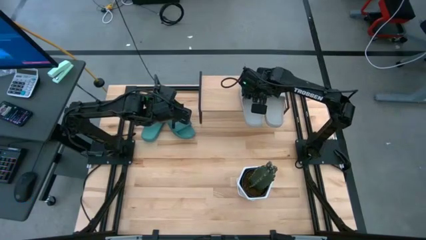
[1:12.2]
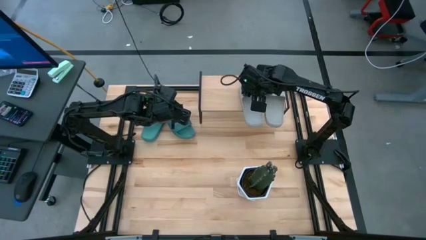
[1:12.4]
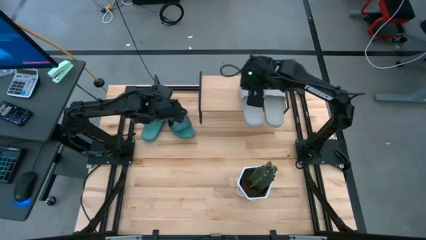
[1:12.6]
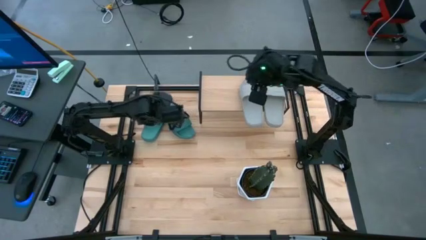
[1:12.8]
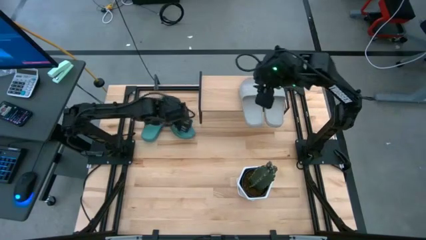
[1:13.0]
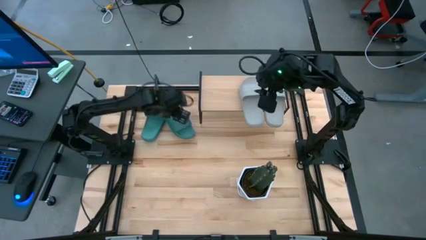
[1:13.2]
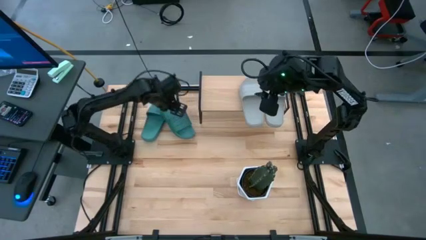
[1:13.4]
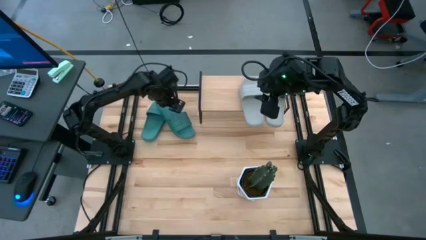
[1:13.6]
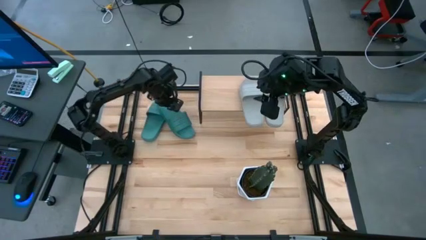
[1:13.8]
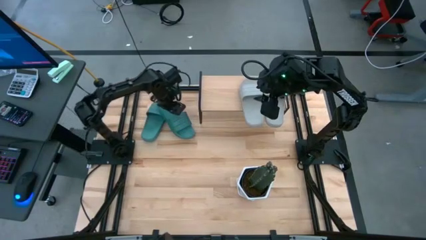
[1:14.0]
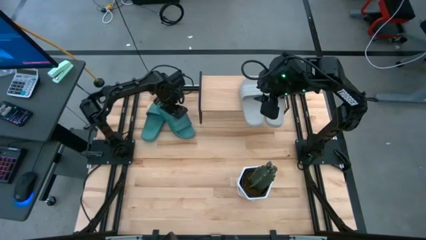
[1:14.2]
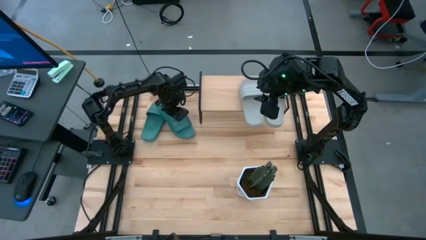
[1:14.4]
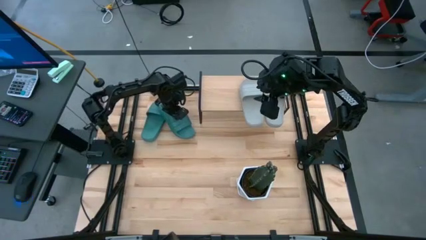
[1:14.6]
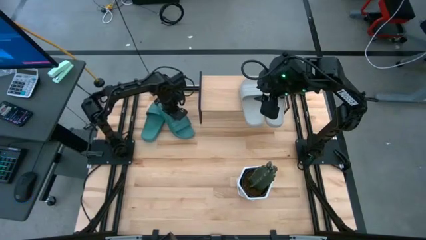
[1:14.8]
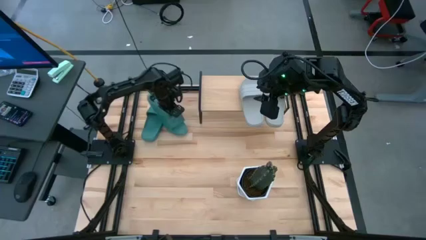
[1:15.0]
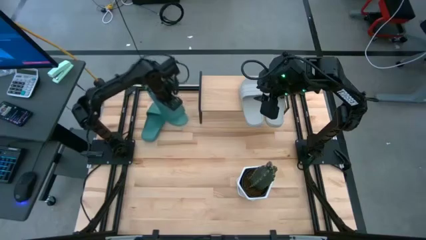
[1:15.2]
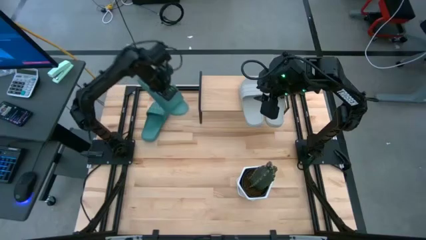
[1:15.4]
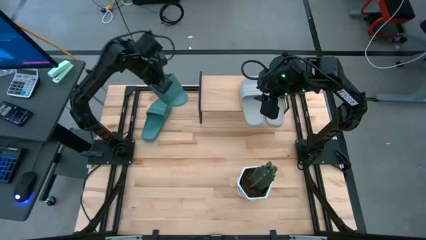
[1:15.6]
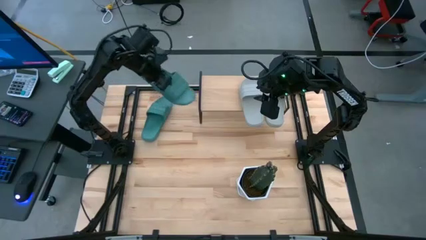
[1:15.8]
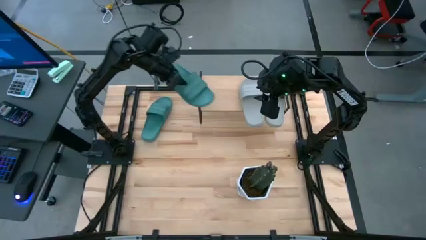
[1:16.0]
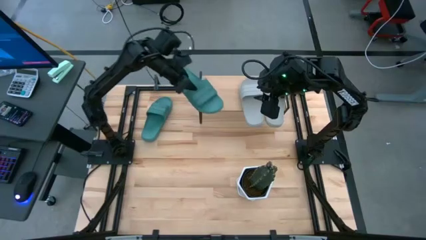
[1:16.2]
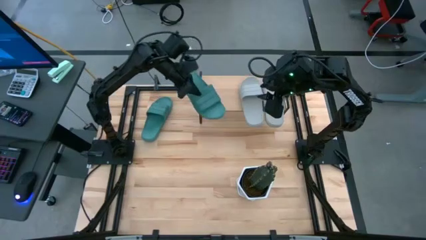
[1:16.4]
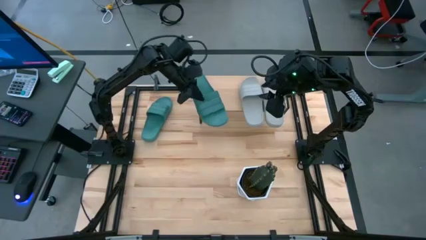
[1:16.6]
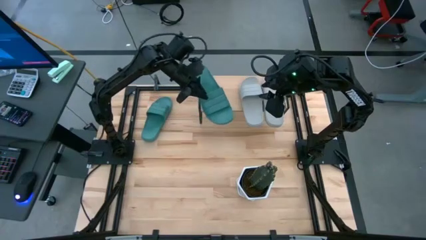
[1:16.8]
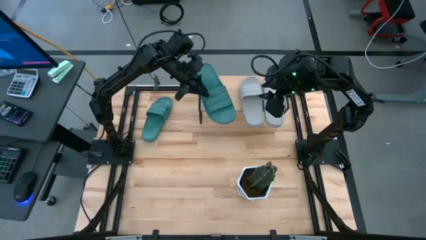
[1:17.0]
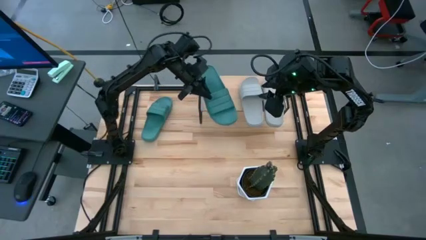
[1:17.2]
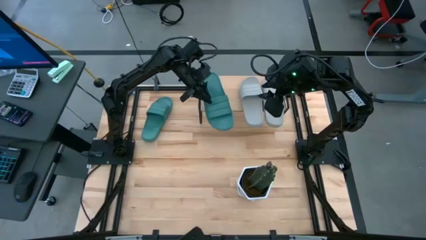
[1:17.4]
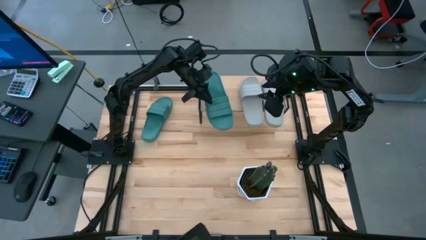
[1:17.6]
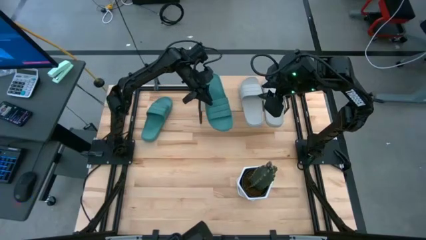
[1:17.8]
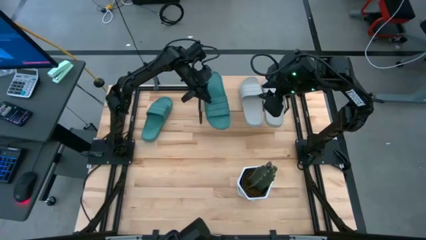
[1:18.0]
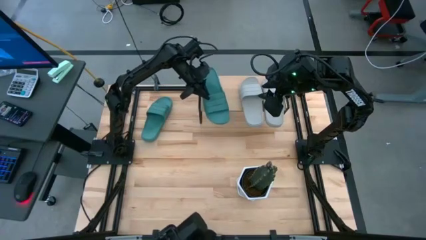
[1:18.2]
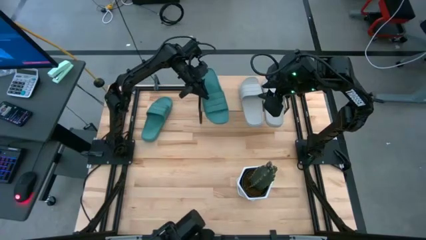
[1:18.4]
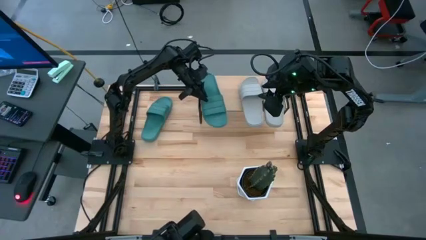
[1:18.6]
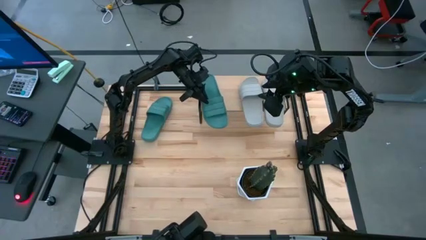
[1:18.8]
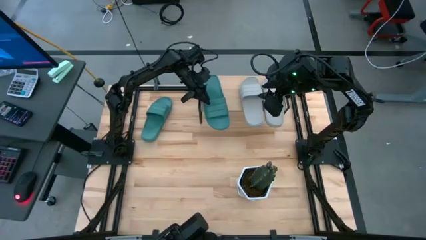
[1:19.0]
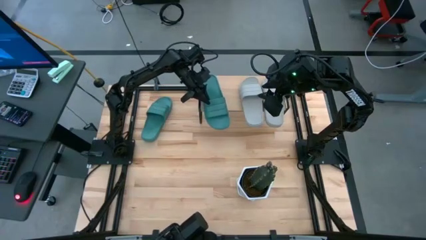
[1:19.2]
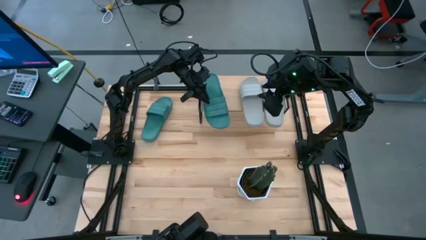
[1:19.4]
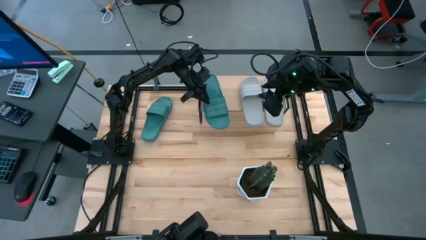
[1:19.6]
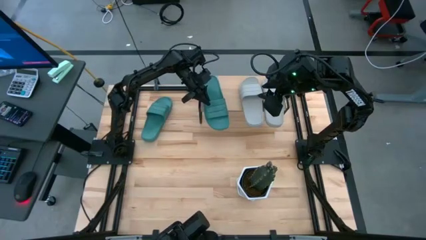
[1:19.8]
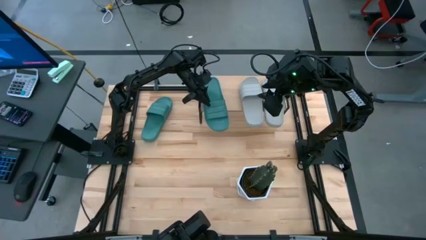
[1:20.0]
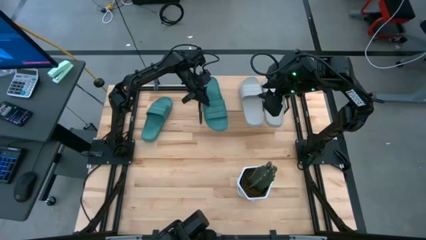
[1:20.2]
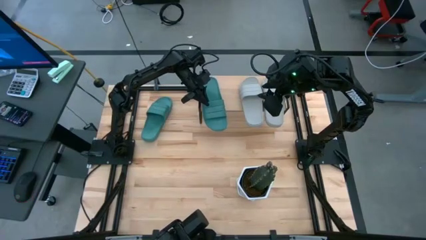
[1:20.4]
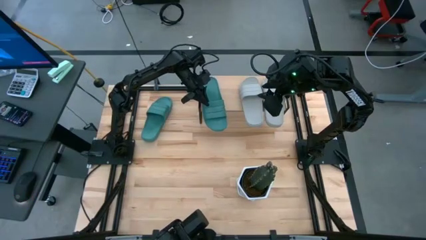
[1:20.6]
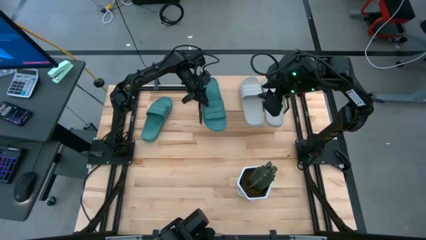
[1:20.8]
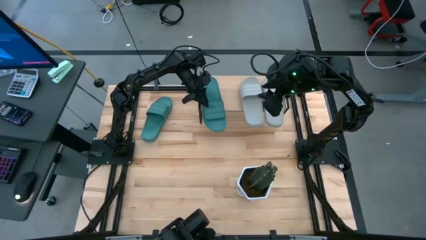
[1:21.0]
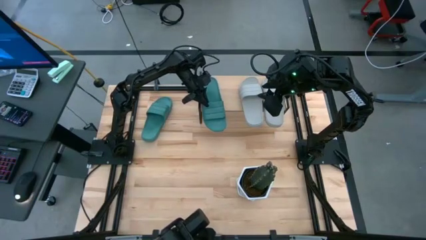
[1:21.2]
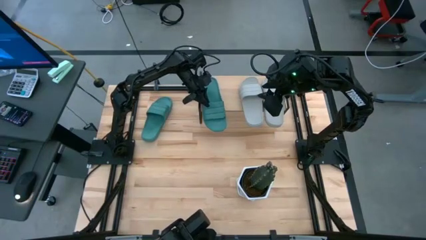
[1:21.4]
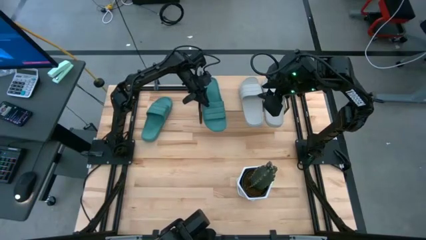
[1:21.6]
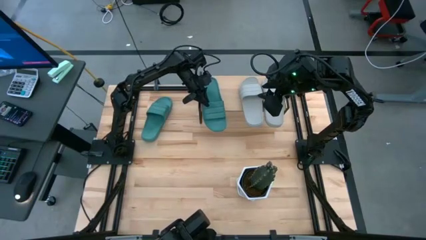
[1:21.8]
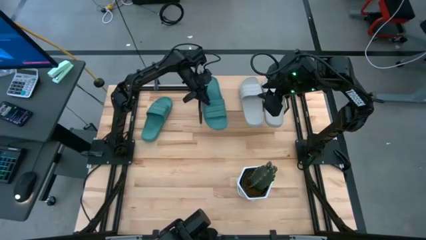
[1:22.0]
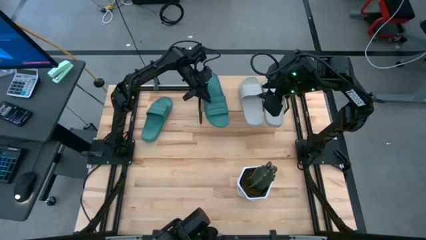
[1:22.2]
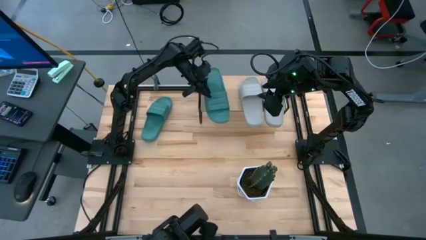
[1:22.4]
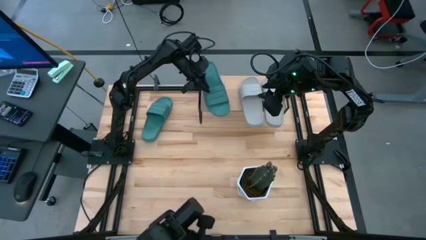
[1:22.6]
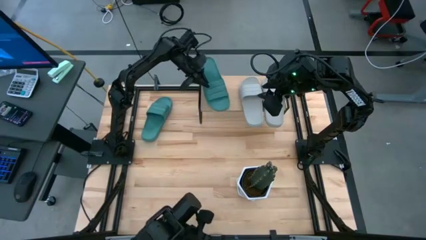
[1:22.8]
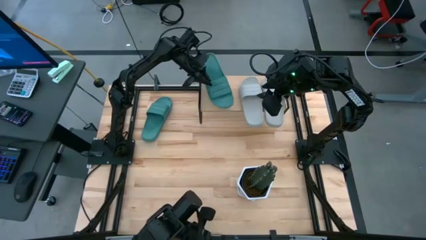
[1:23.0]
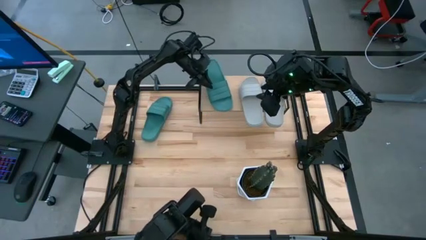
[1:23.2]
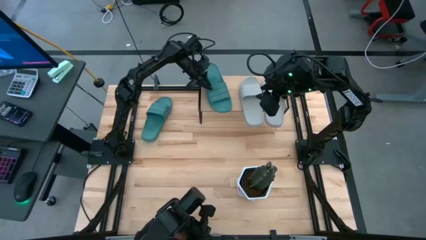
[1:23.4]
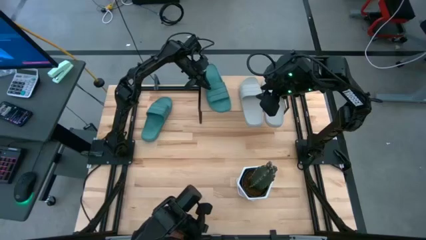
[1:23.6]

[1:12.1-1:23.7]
Task: Pick and place slides into the shelf
Put the right green slipper on the shelf
